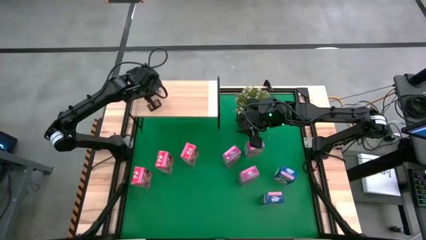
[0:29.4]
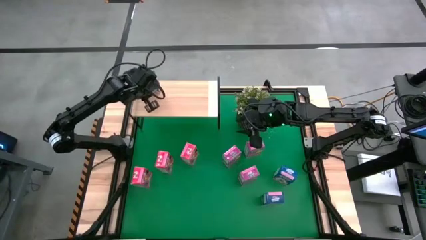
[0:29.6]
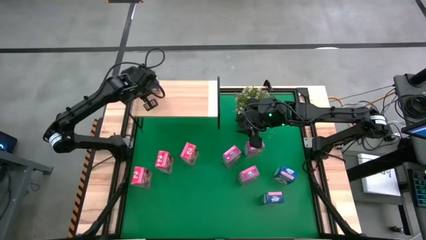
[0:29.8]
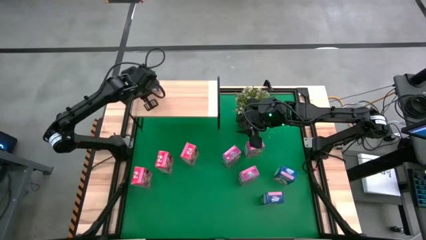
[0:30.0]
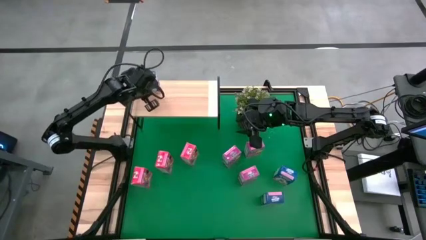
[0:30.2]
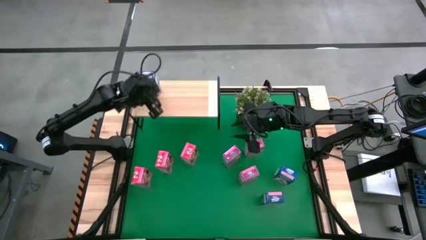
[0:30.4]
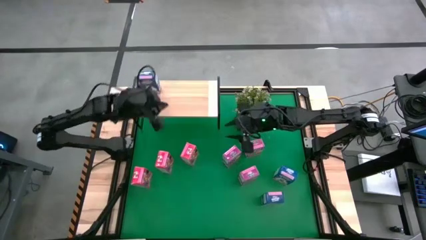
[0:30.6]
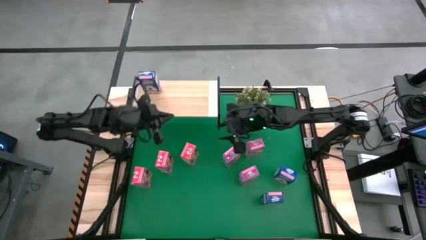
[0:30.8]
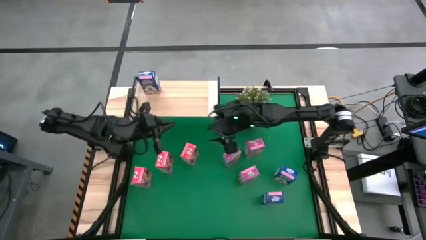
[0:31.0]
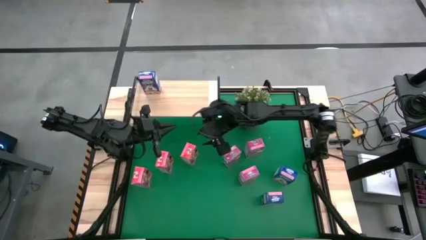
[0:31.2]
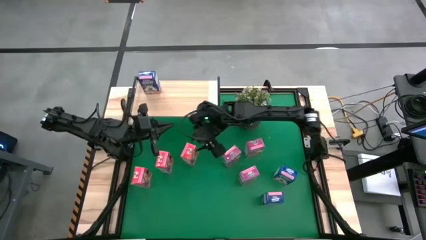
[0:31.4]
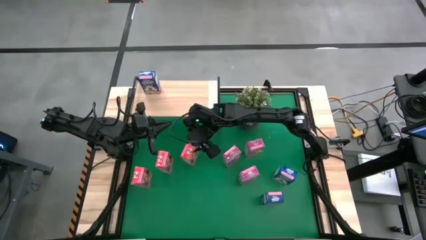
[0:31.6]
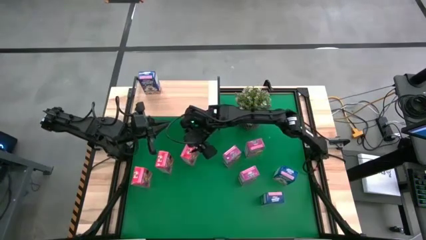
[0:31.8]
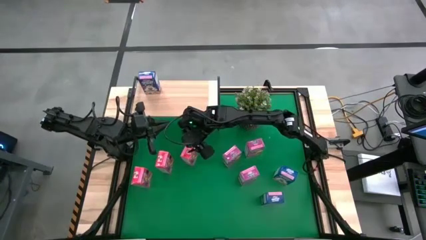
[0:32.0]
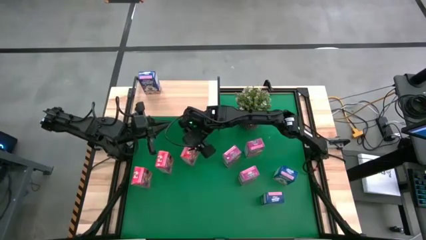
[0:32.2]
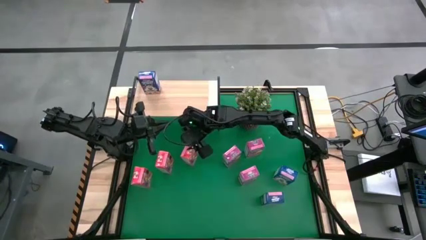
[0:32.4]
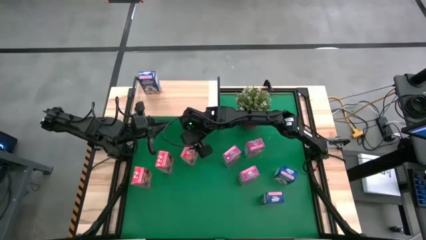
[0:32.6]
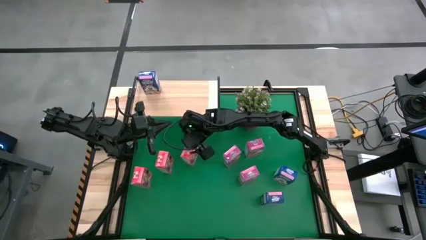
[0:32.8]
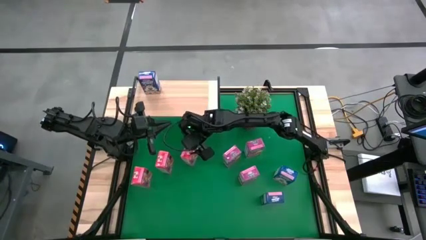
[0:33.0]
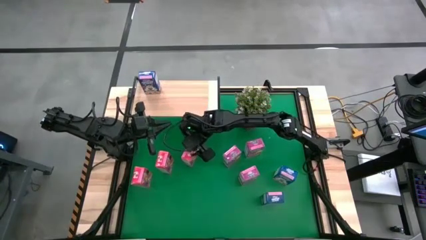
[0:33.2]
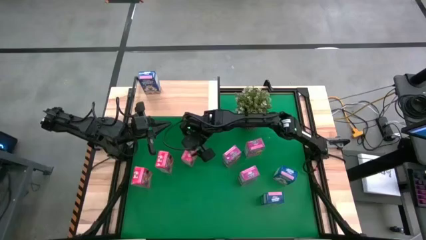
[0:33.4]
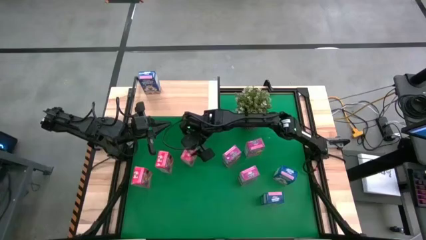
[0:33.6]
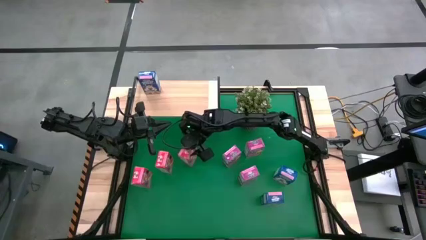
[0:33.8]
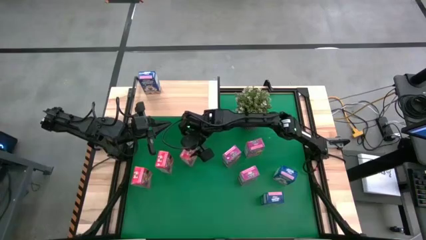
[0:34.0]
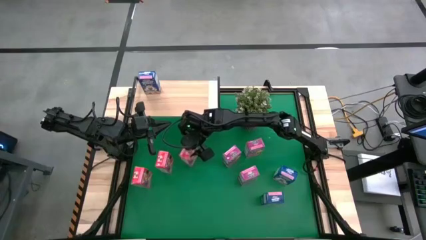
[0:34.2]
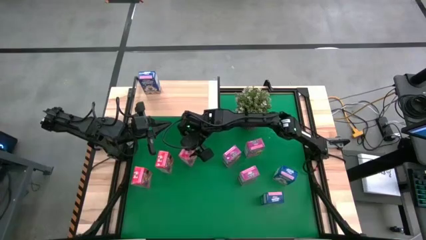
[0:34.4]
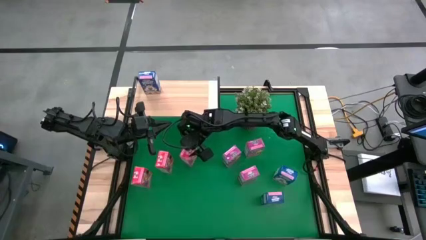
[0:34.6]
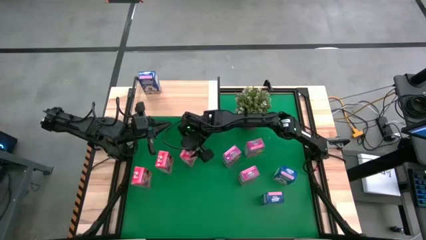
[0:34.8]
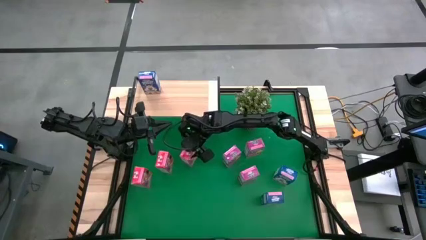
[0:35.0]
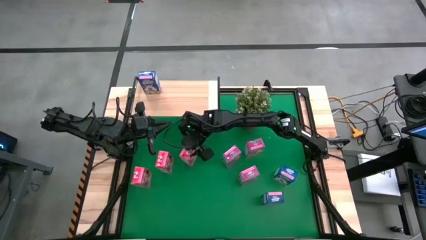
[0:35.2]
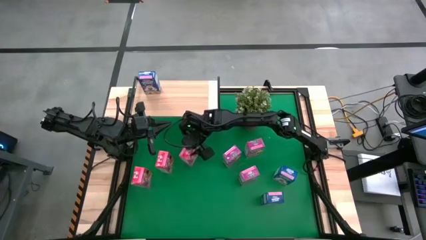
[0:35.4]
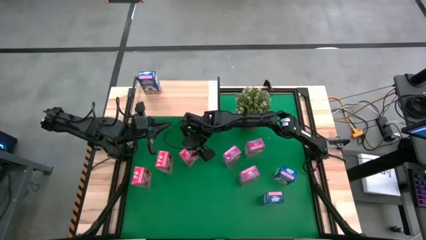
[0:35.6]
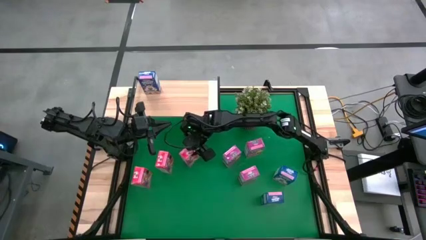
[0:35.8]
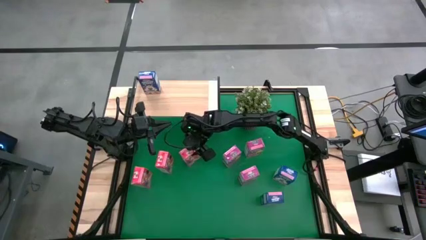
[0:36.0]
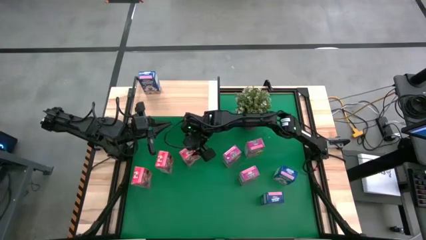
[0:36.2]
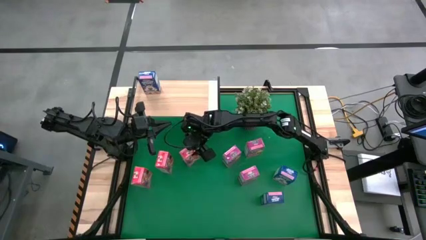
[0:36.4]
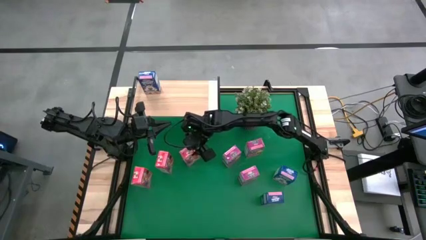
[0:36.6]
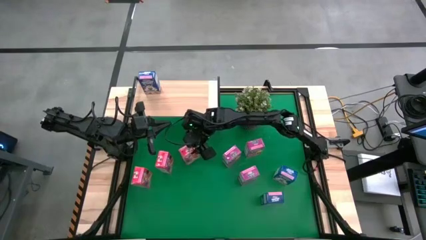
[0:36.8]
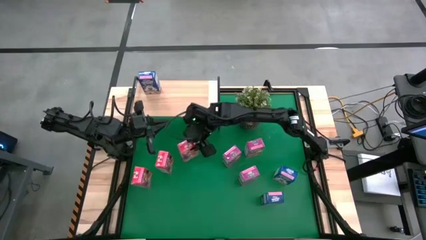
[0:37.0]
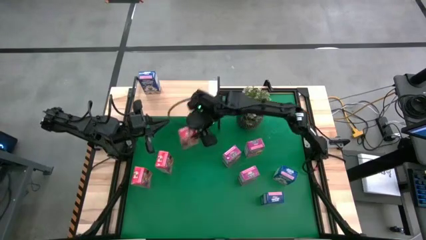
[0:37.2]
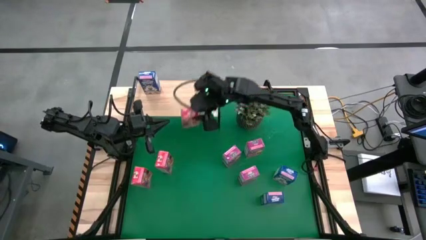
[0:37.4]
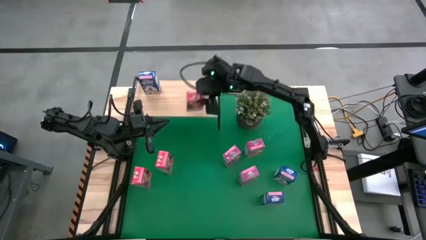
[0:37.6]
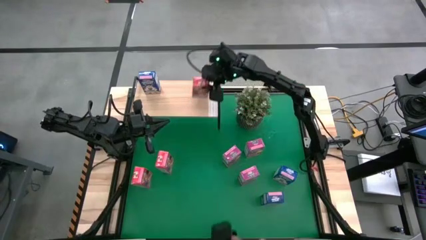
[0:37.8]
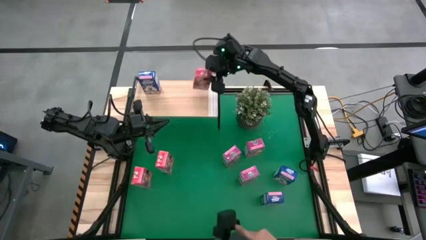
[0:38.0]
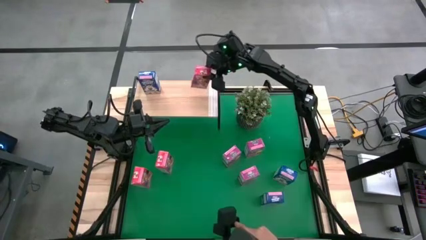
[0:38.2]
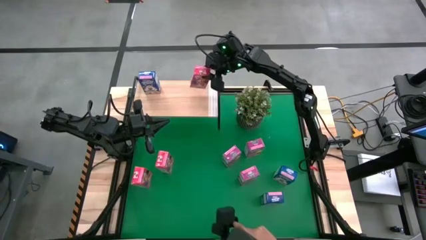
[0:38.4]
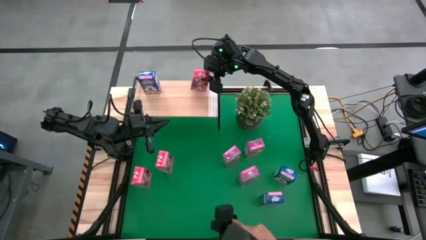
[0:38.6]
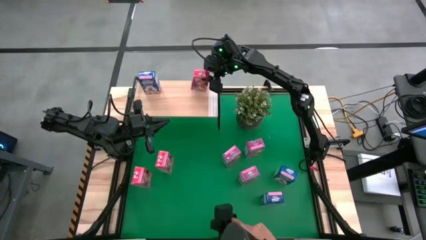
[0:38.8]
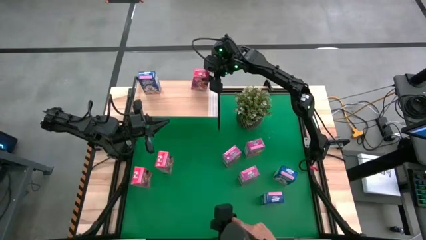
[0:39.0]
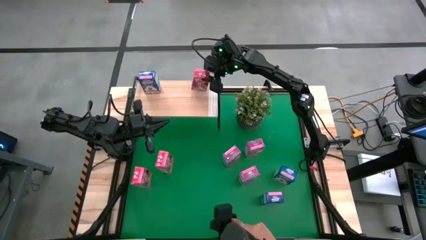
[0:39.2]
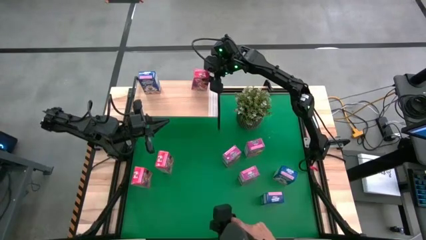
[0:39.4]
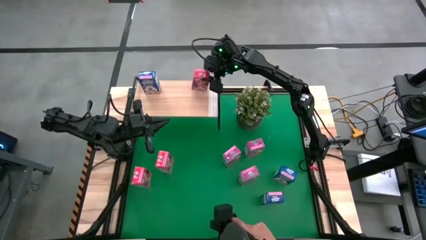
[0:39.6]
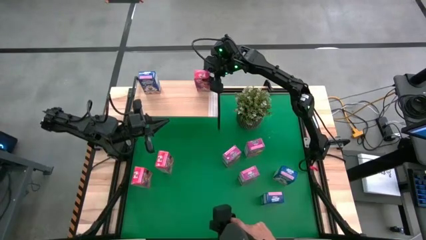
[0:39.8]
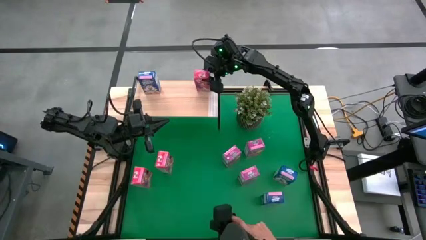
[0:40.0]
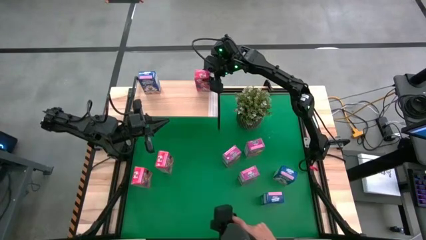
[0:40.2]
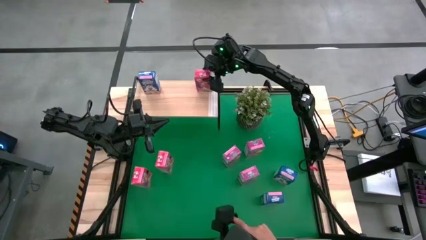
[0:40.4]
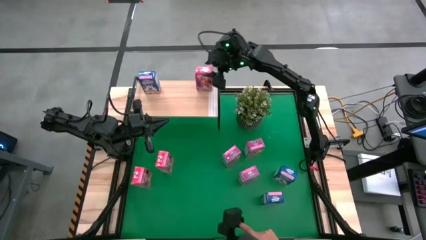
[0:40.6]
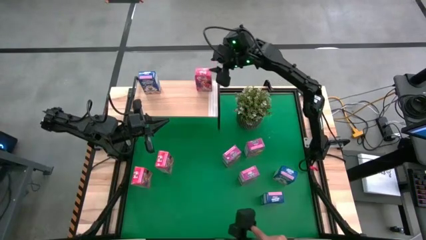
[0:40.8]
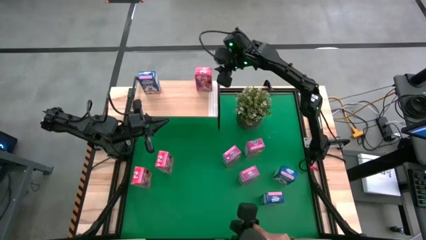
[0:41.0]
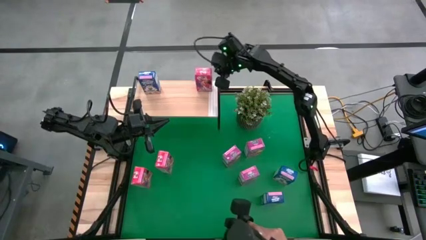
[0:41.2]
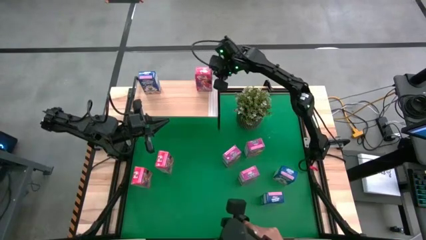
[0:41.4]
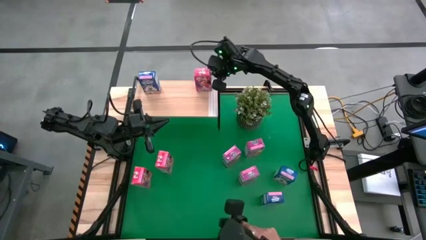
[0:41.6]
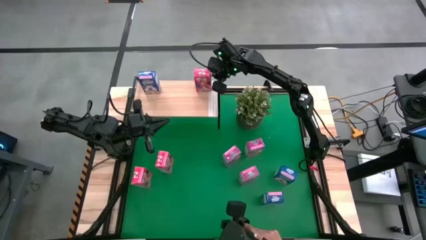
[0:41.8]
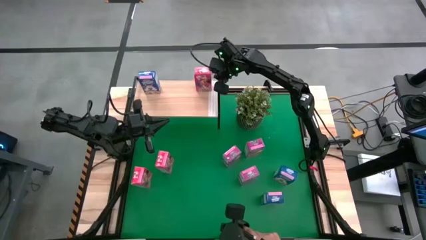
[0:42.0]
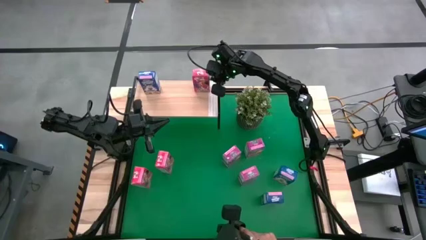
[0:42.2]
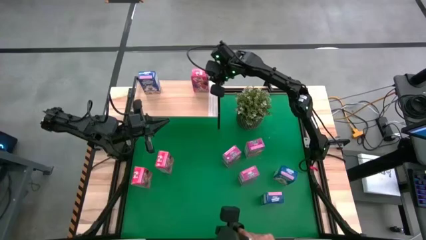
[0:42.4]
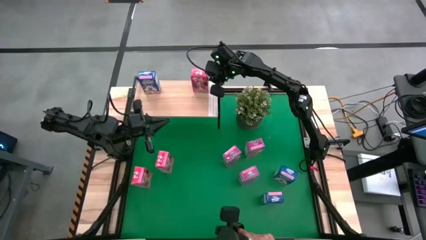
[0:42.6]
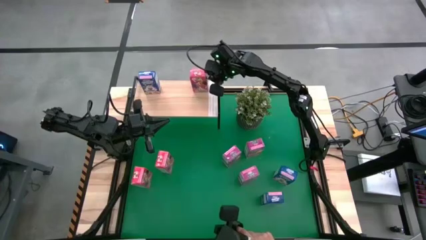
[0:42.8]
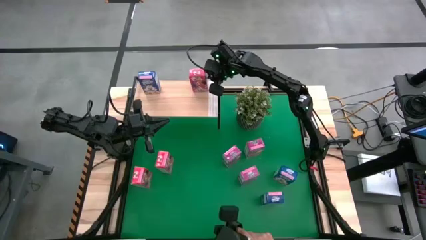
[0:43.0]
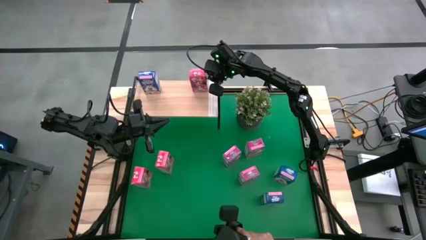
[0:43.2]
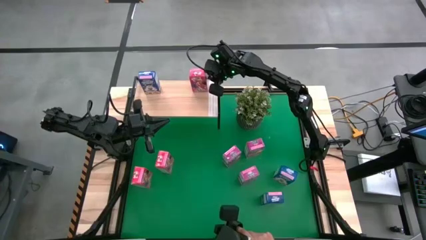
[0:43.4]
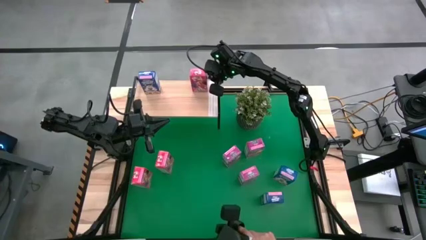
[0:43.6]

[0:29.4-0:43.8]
Task: Stack cereal on shelf
Put the right red cereal box on the shelf
